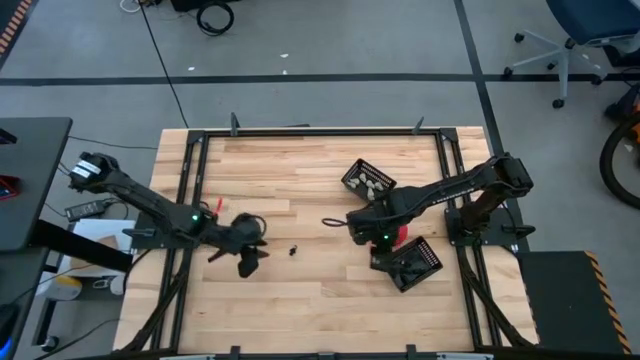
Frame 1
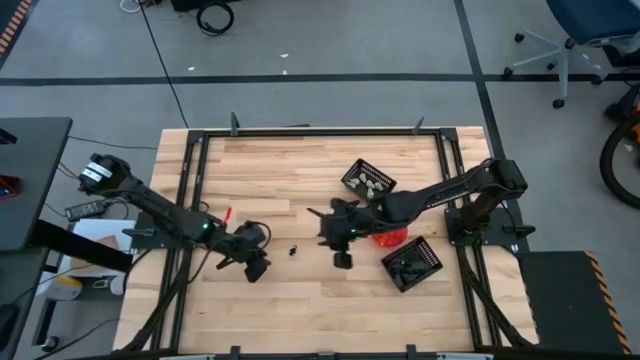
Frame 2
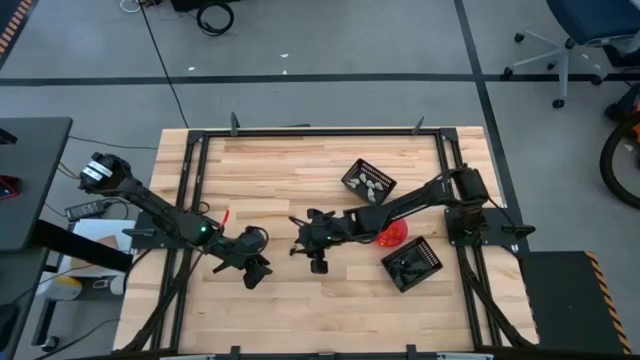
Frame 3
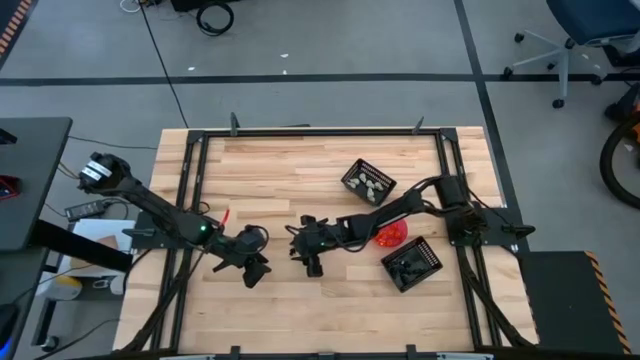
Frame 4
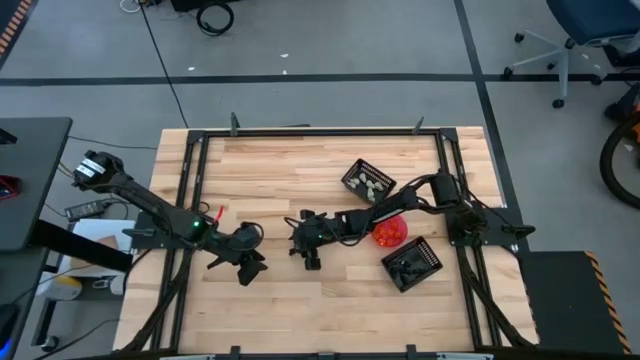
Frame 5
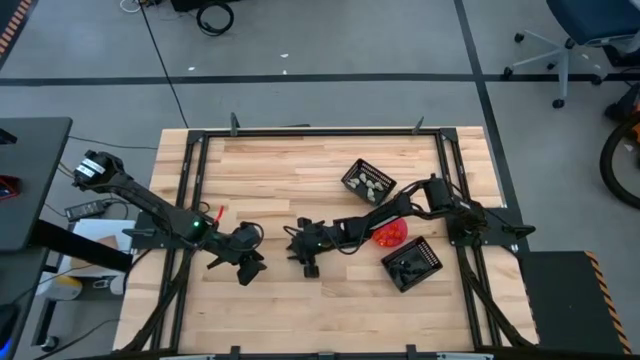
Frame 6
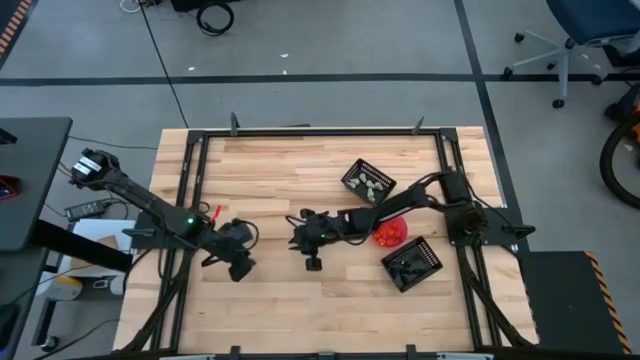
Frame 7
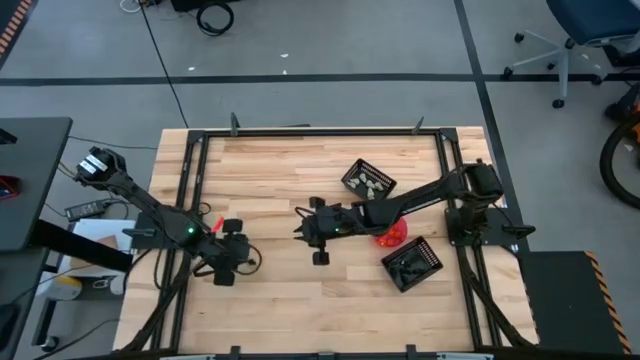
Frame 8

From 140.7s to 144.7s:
Task: Sort Halloween decoration
Put the black skeleton toy into the bottom black basket

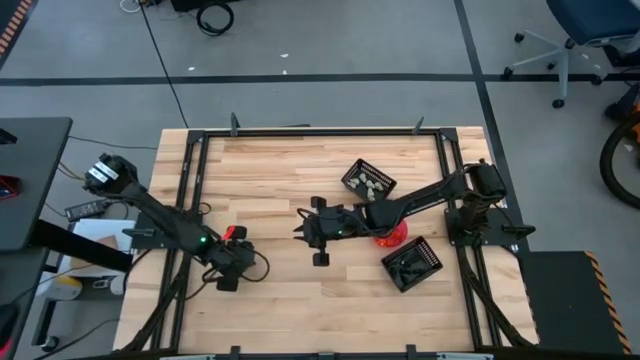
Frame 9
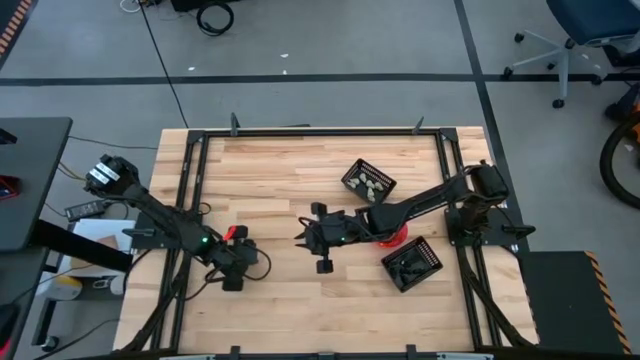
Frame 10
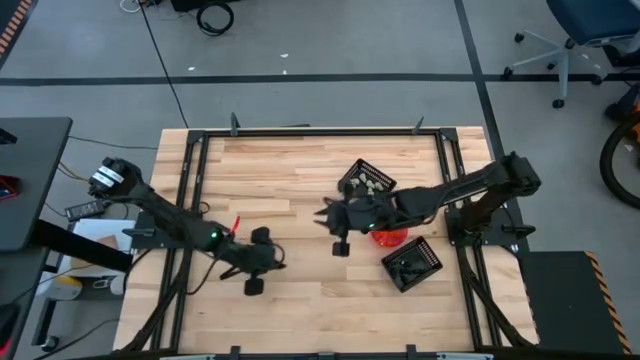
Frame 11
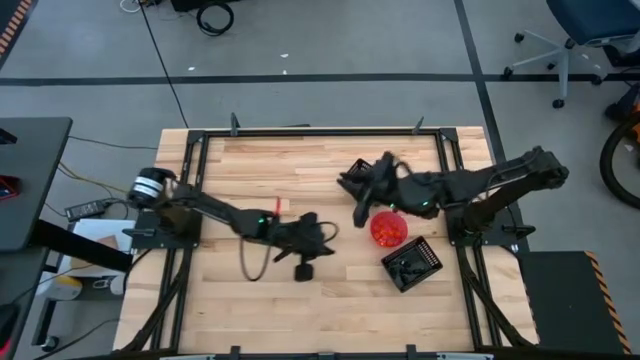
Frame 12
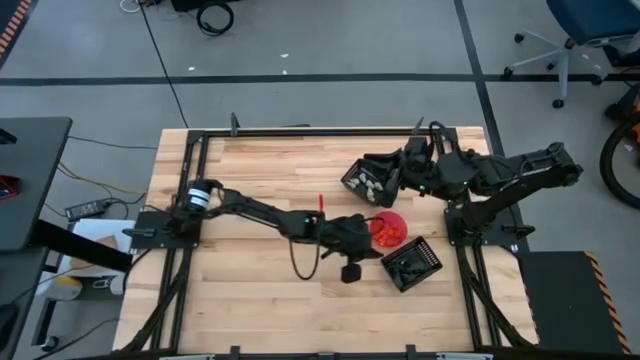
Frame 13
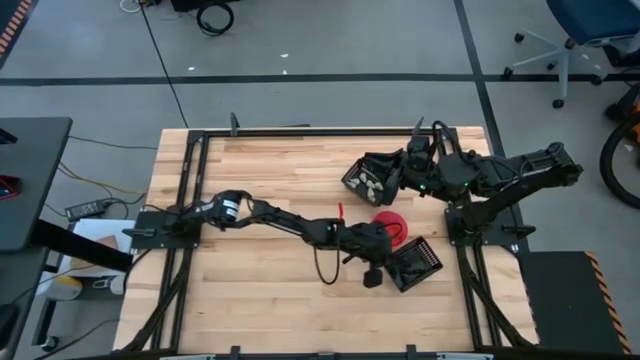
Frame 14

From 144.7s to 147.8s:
Put the black skeleton toy into the bottom black basket

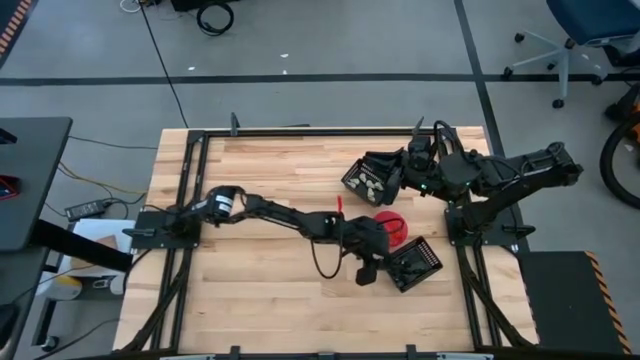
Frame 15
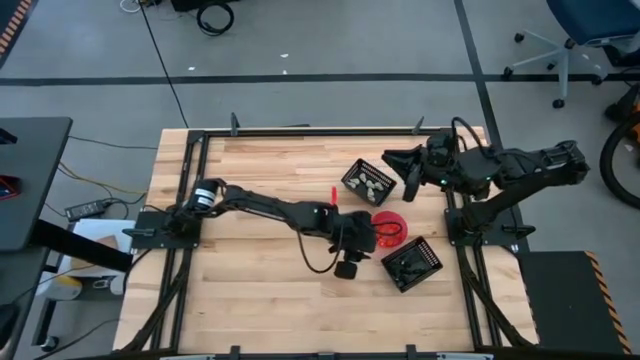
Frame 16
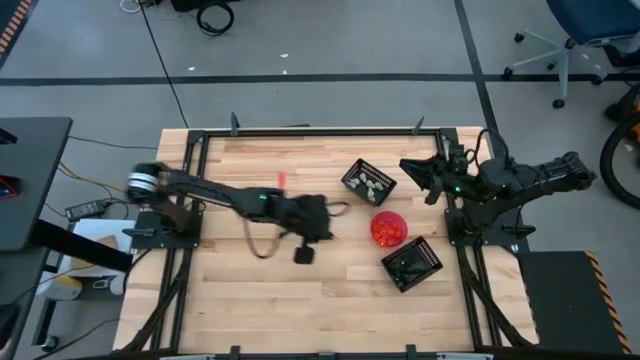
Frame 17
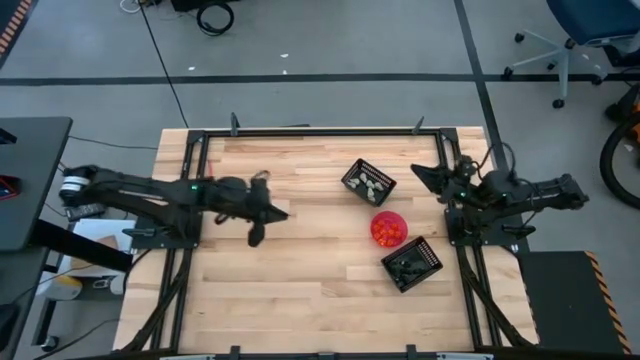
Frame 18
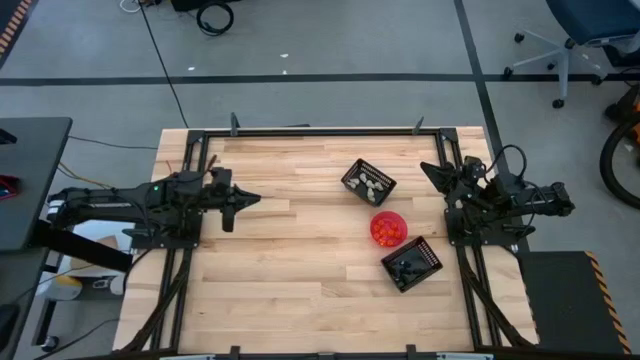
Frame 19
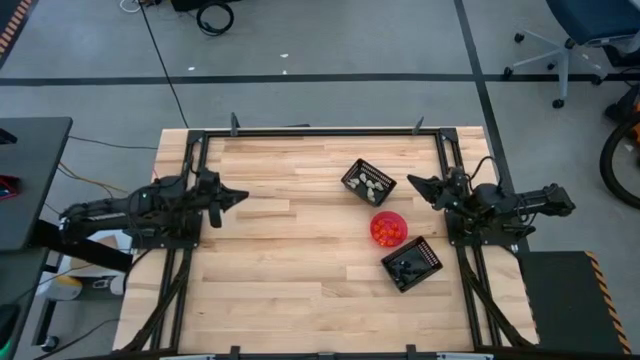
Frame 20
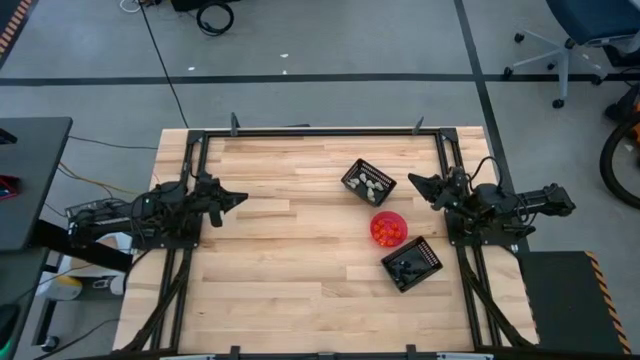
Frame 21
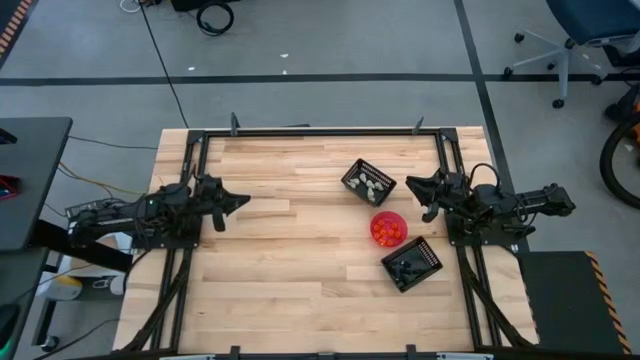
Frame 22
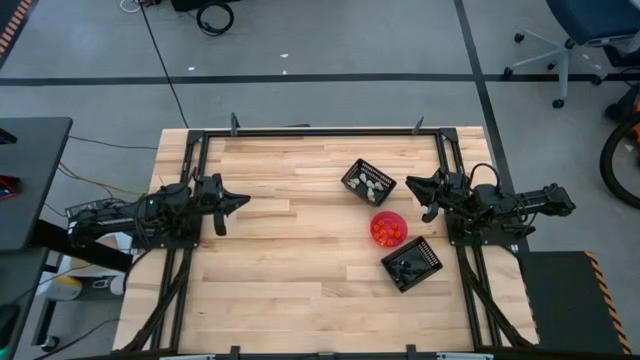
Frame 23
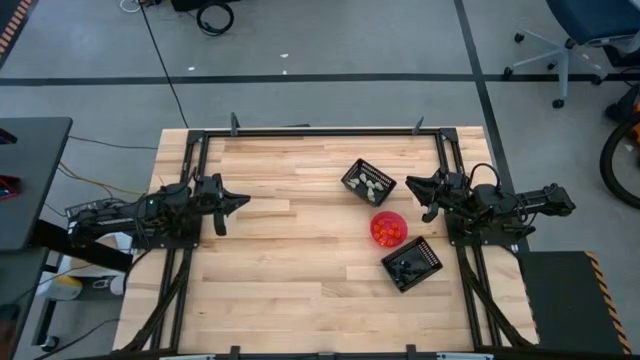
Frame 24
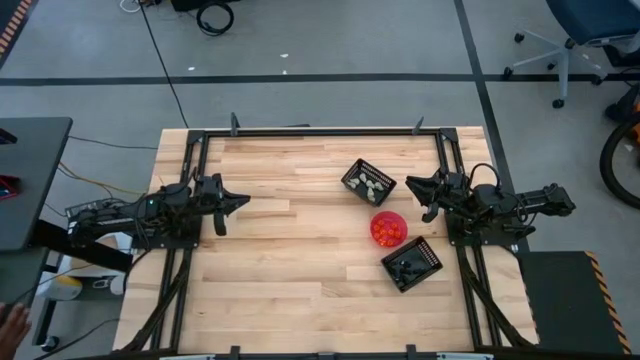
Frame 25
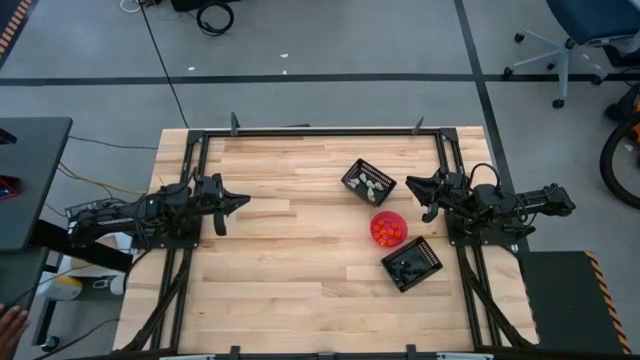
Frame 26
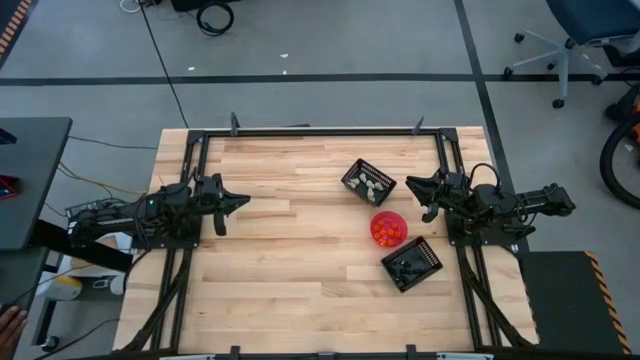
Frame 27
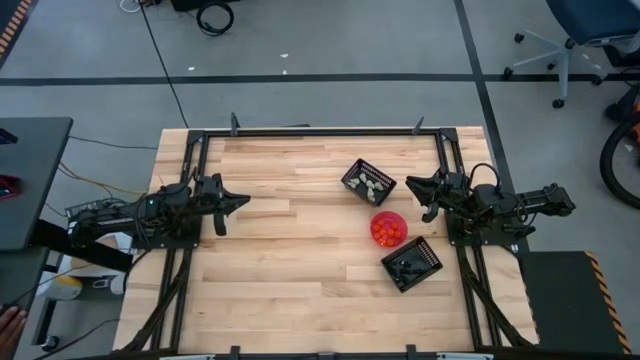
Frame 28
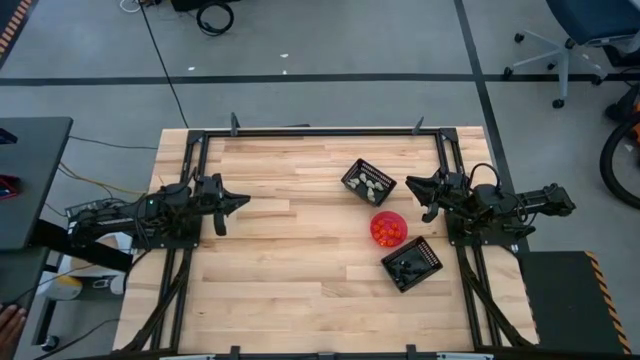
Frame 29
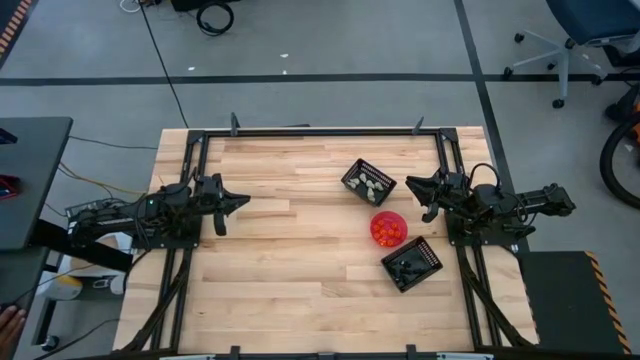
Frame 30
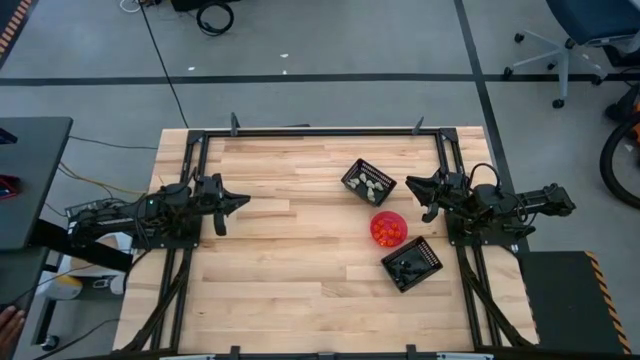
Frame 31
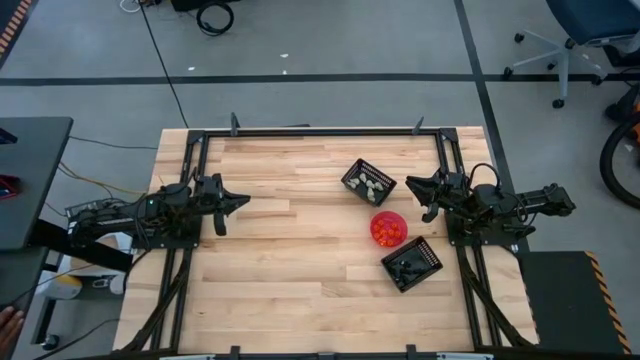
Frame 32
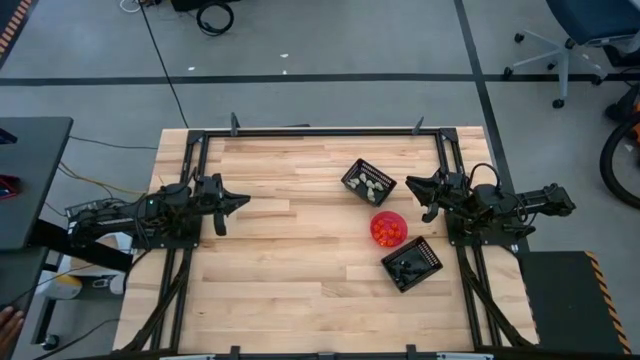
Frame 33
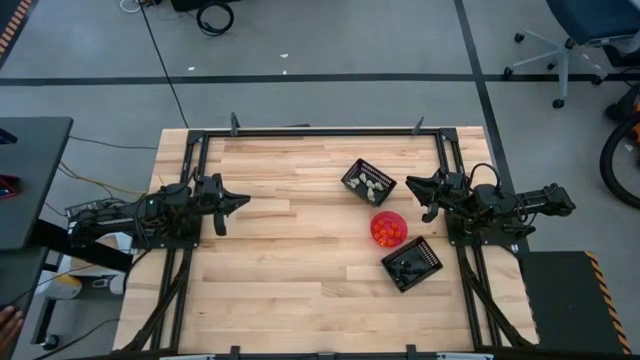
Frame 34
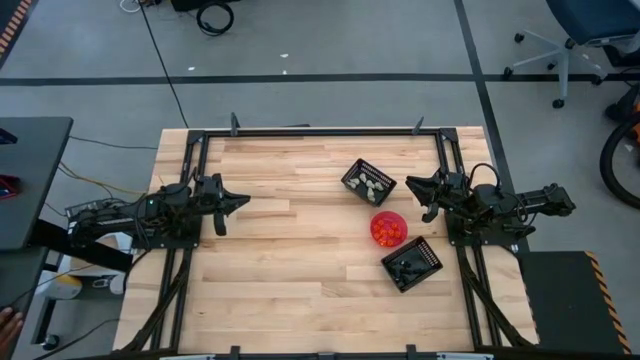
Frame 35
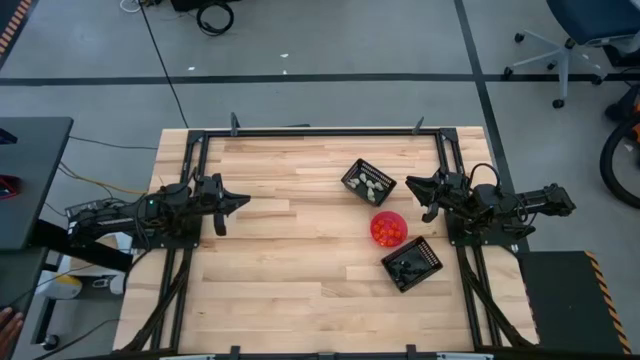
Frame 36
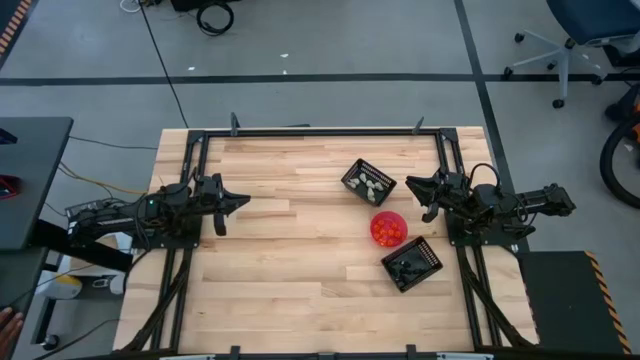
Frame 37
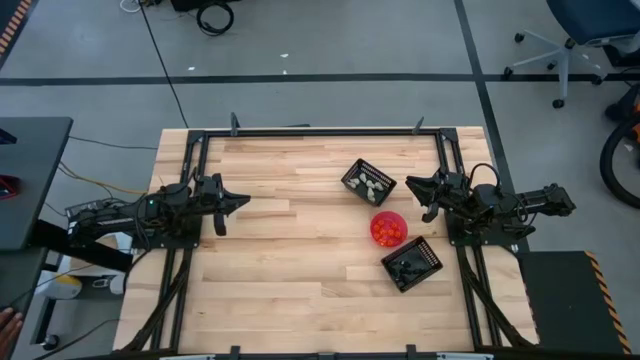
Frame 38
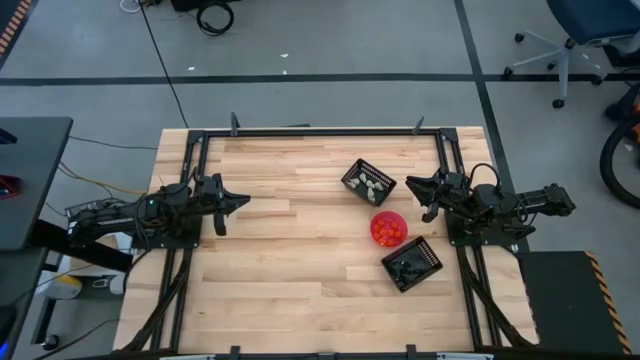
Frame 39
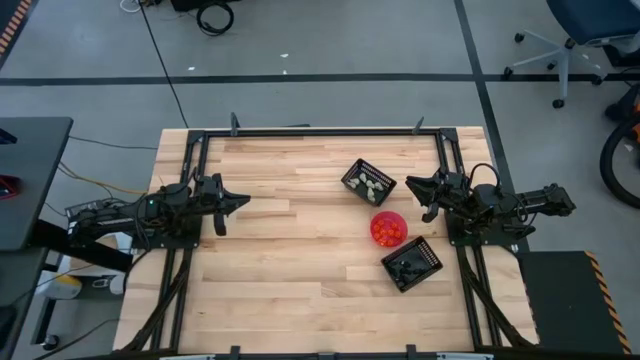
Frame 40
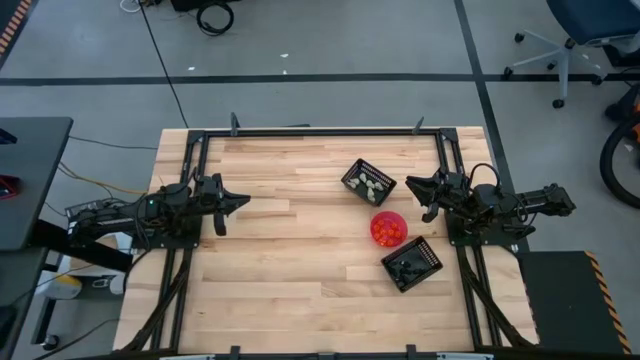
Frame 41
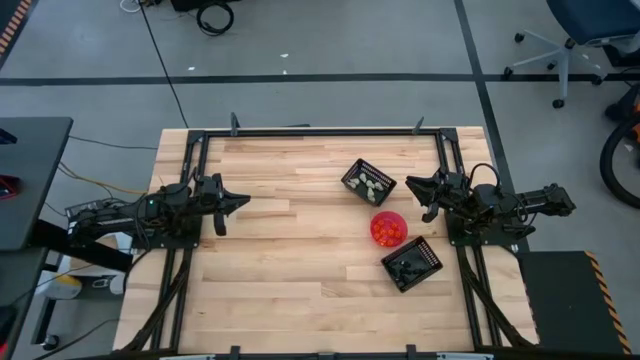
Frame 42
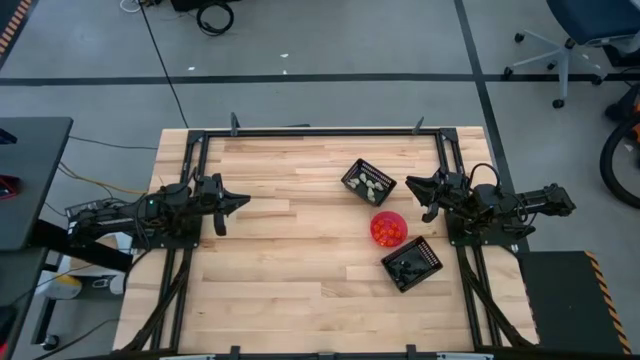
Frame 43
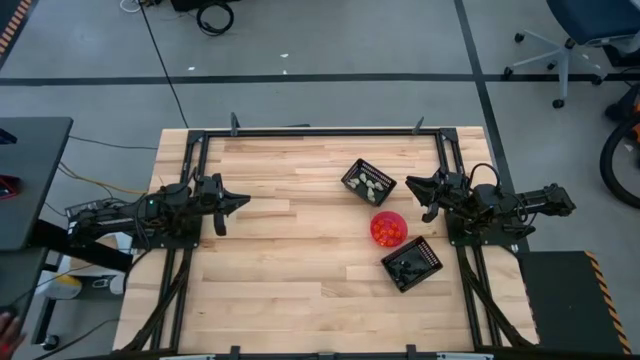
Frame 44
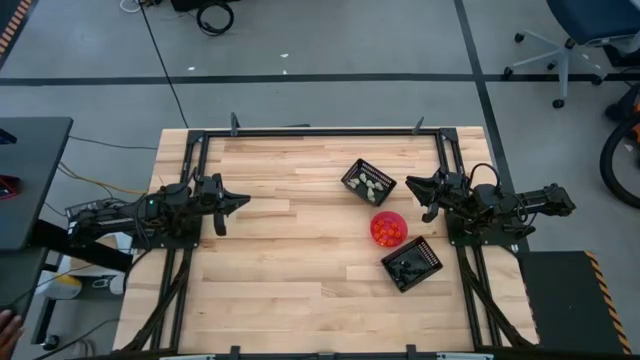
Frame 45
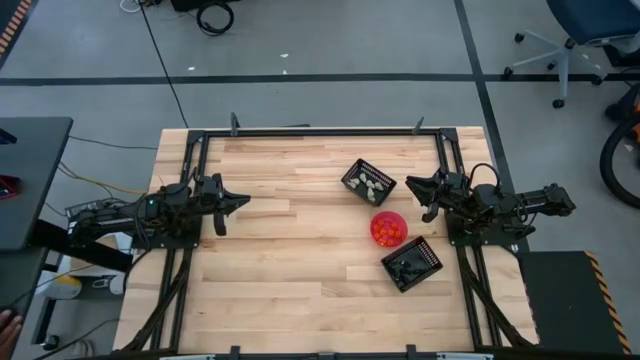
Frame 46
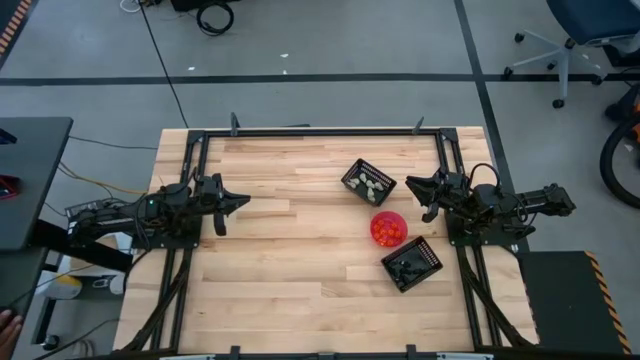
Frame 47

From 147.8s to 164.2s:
Return to Home Position
